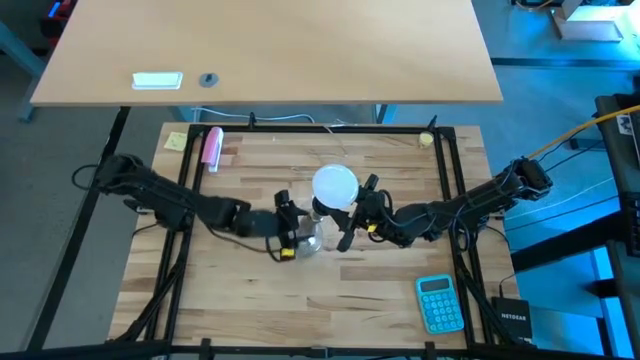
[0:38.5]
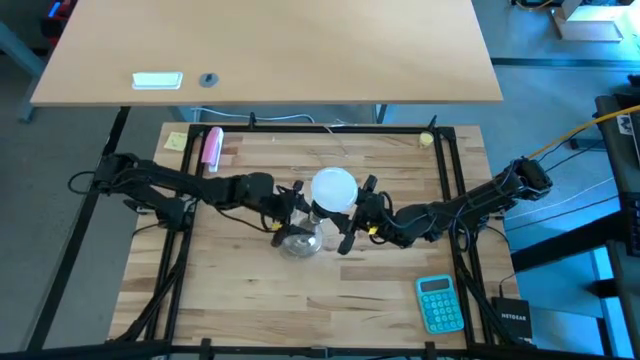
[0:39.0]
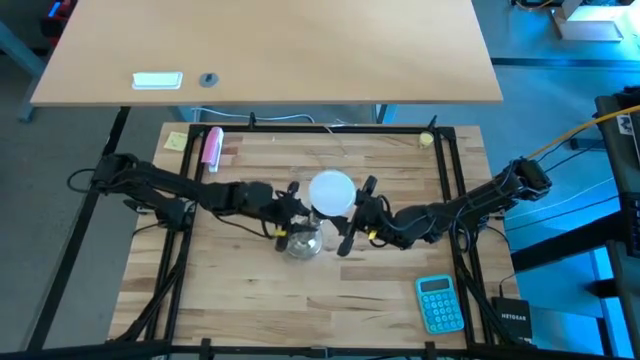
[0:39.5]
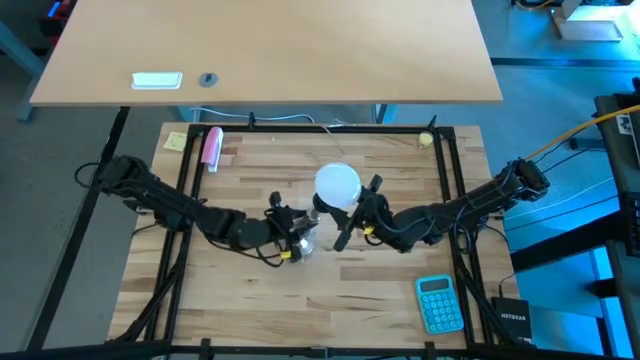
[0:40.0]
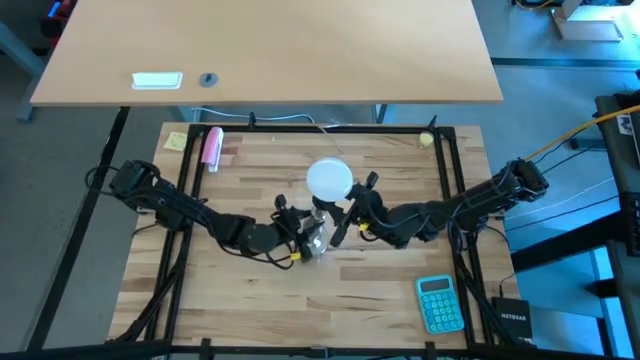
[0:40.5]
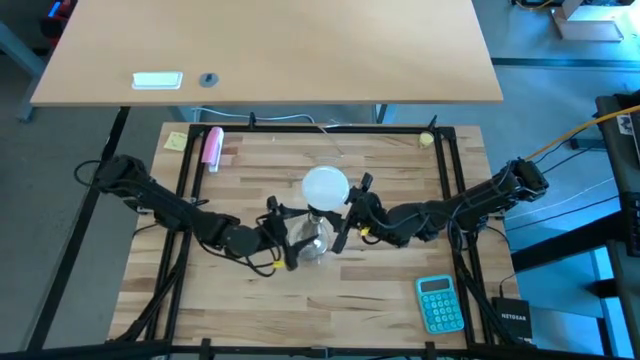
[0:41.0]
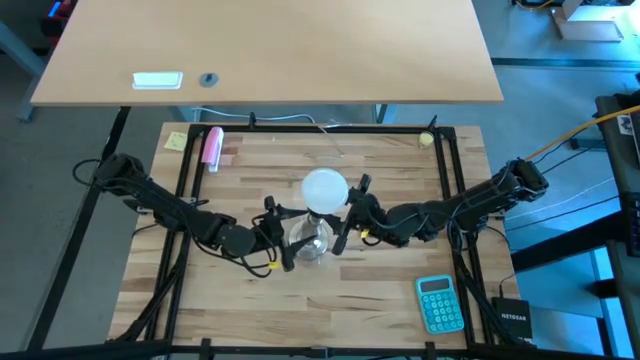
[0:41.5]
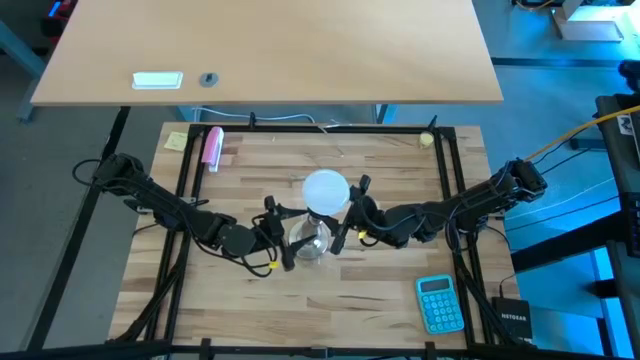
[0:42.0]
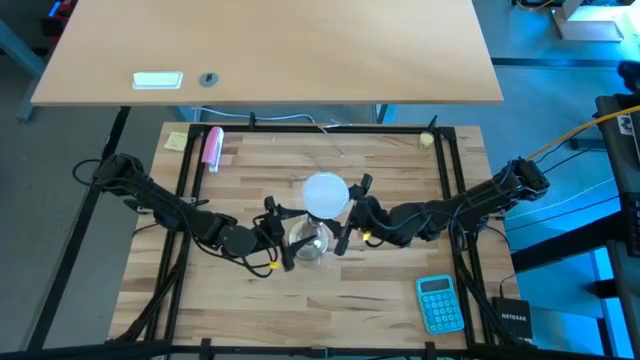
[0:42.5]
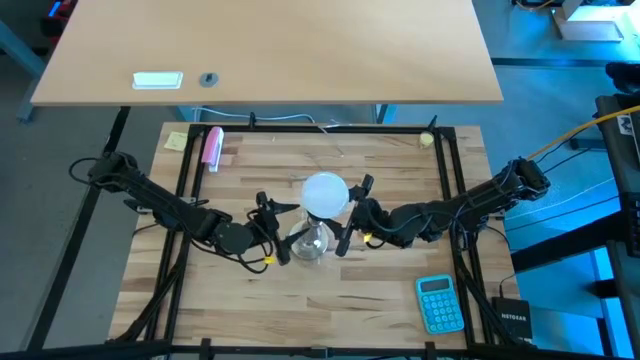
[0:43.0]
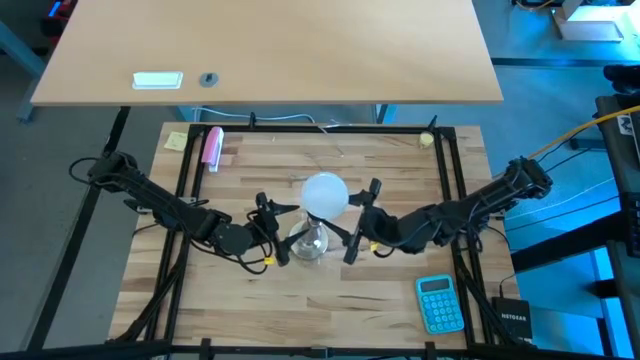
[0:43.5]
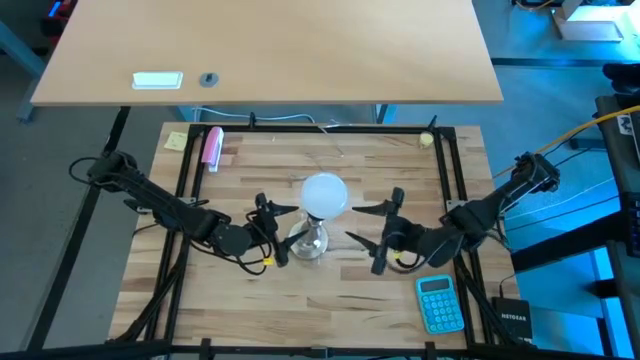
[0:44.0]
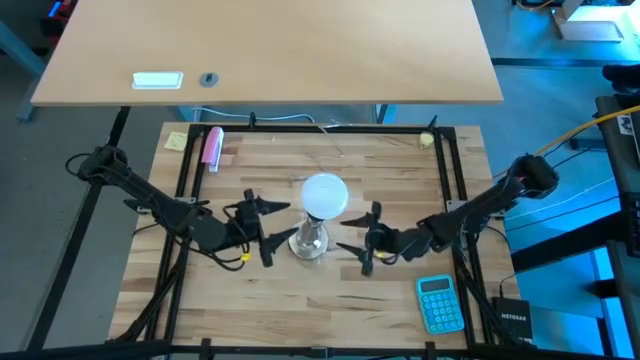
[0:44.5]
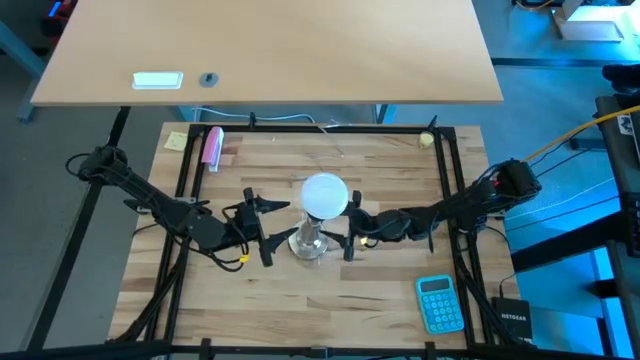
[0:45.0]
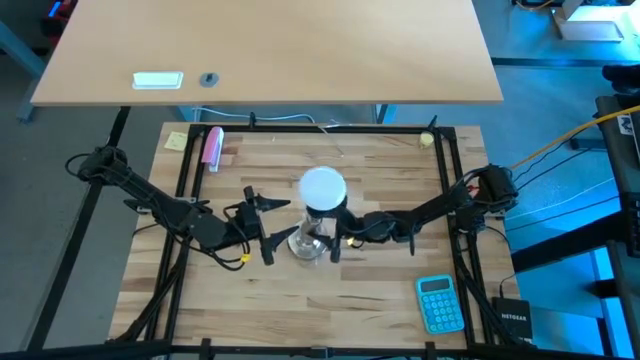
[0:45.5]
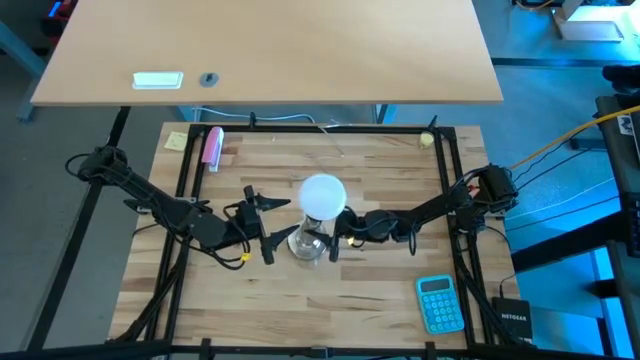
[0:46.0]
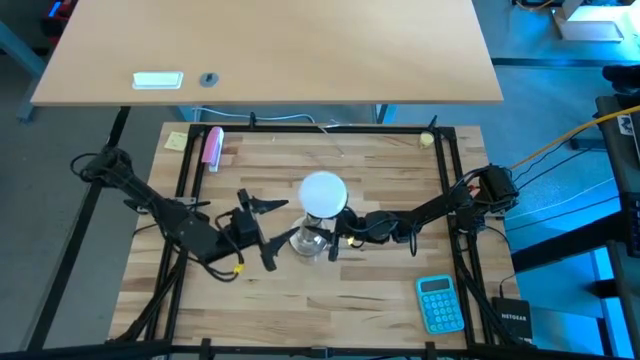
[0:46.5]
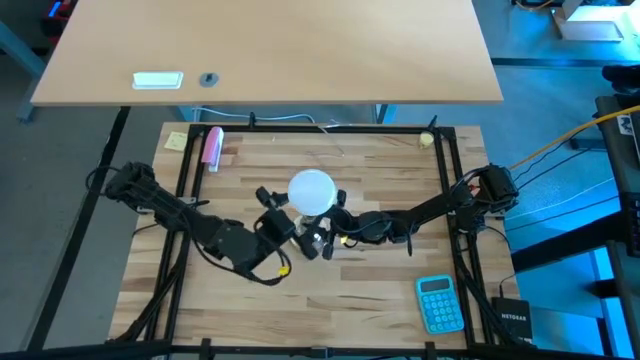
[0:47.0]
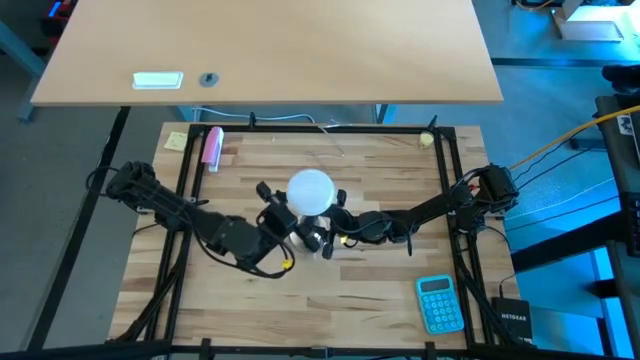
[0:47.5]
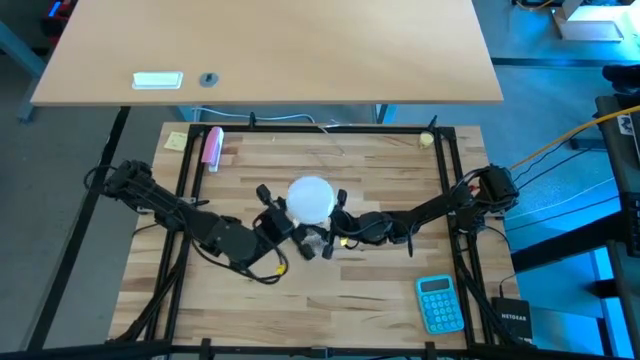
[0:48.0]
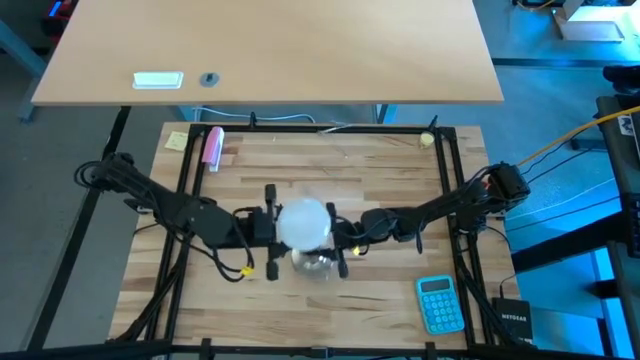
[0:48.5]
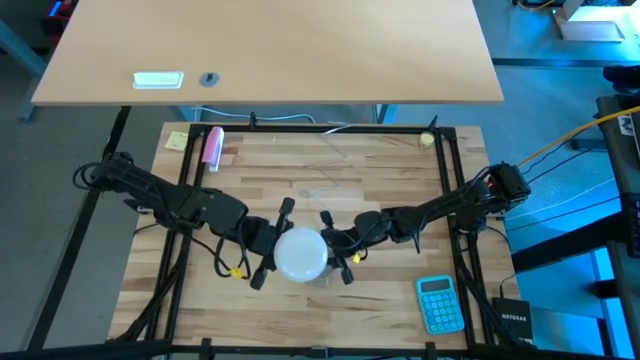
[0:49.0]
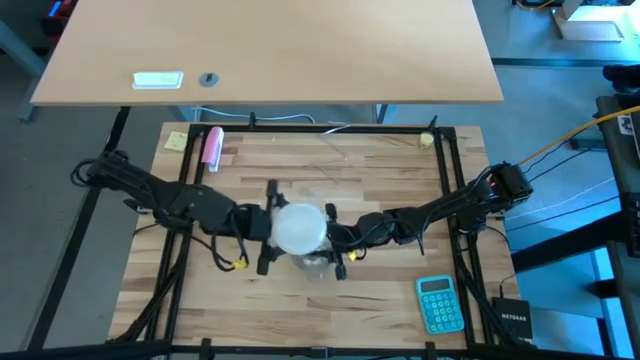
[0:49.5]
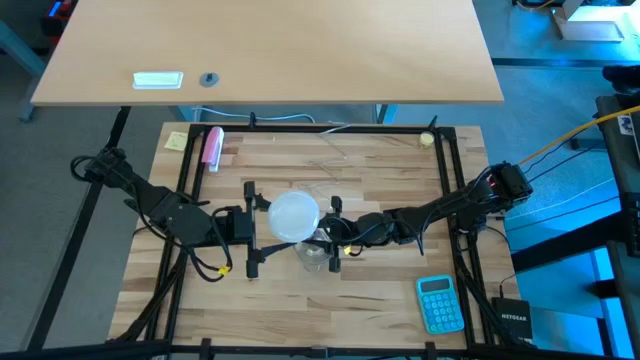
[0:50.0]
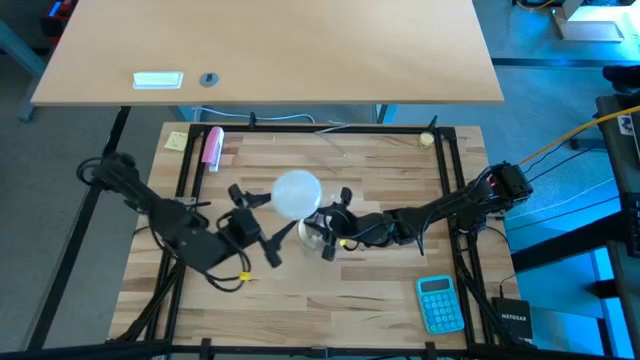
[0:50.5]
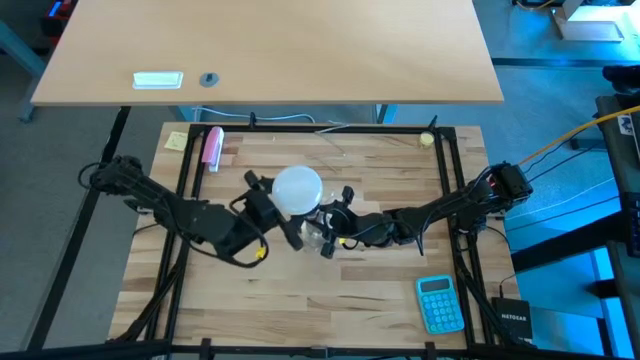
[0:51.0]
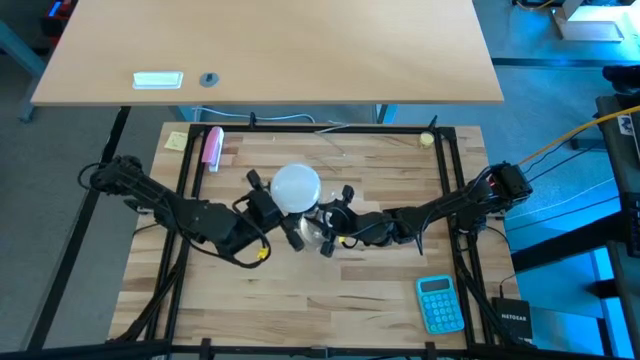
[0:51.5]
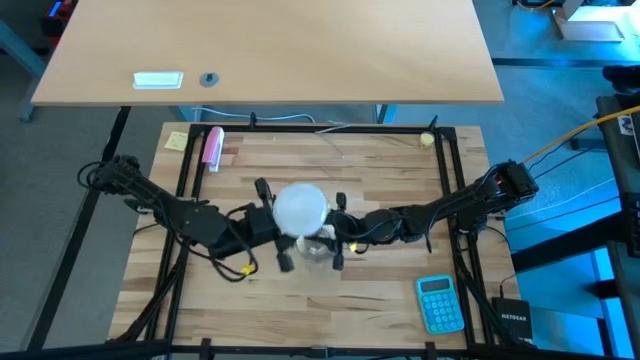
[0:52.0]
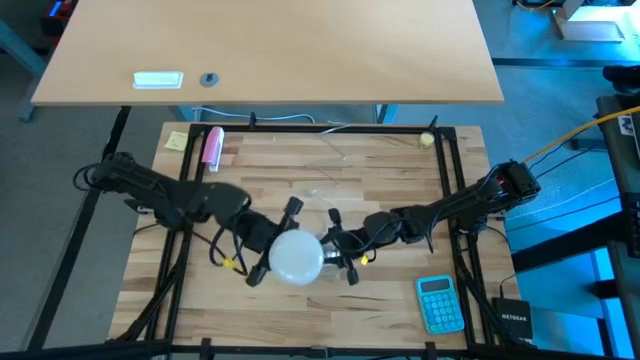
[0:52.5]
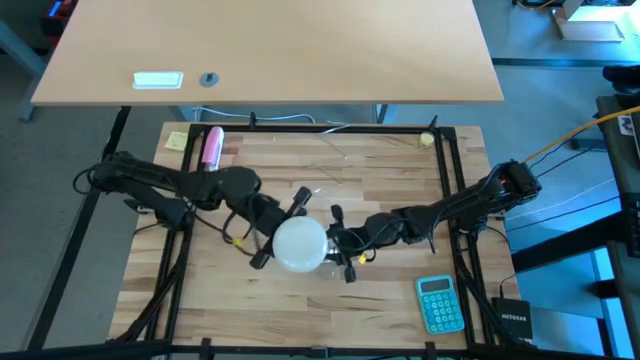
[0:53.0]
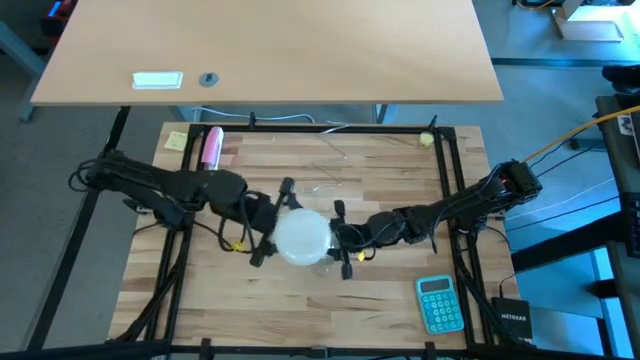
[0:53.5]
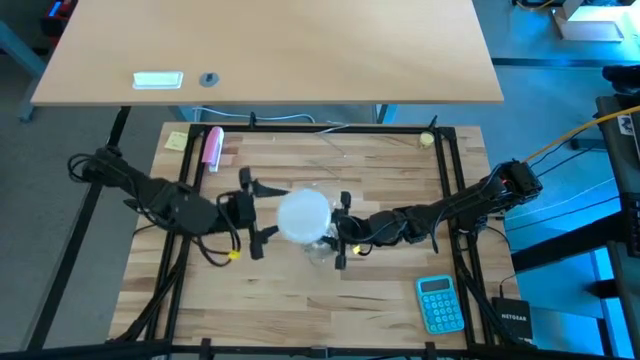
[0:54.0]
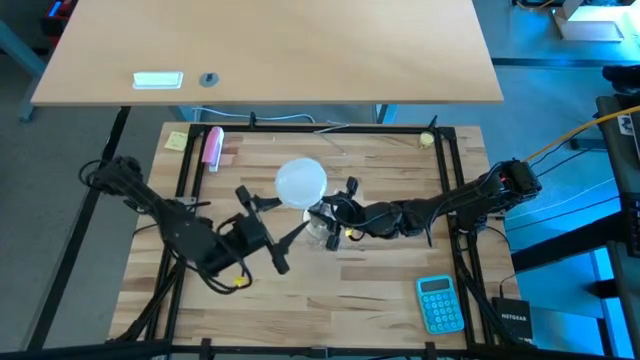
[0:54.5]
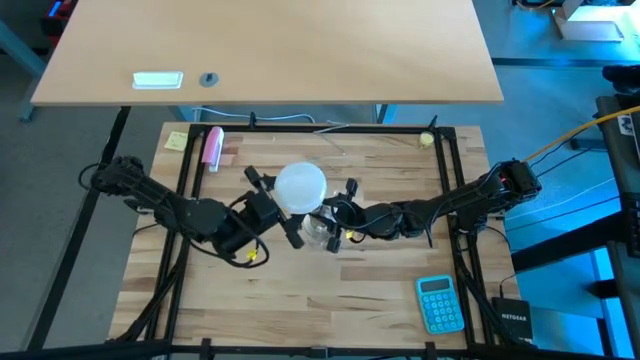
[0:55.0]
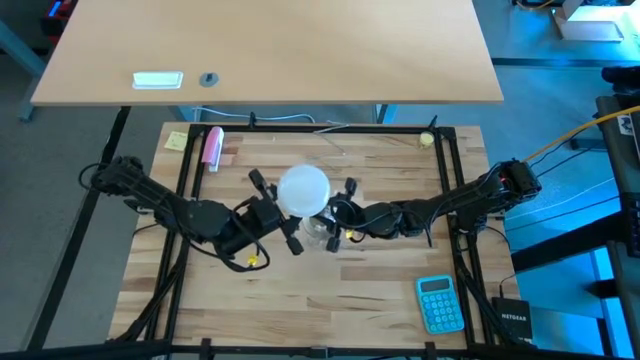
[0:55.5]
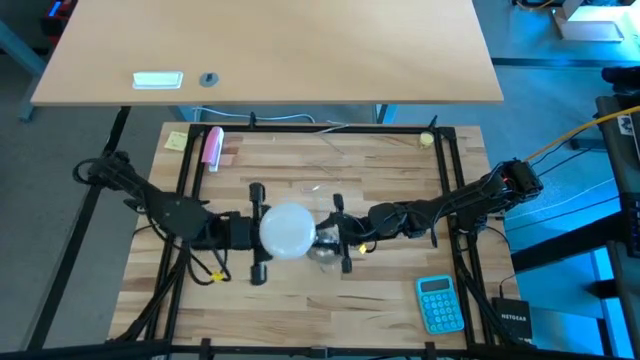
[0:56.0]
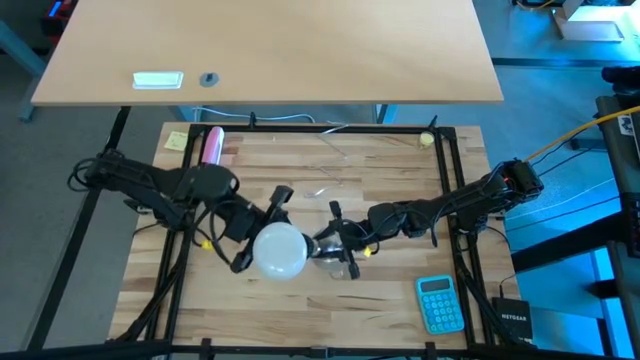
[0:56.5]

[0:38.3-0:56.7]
Task: Screw lightbulb
Insert the light bulb into the lamp

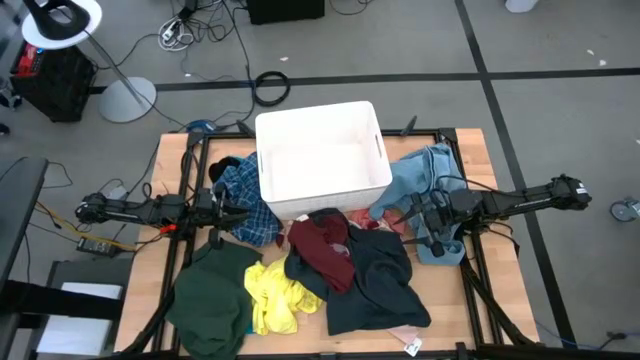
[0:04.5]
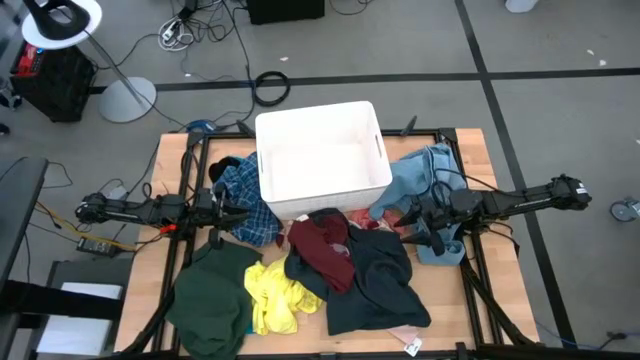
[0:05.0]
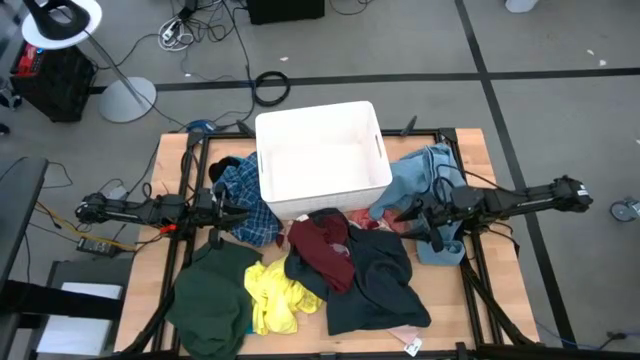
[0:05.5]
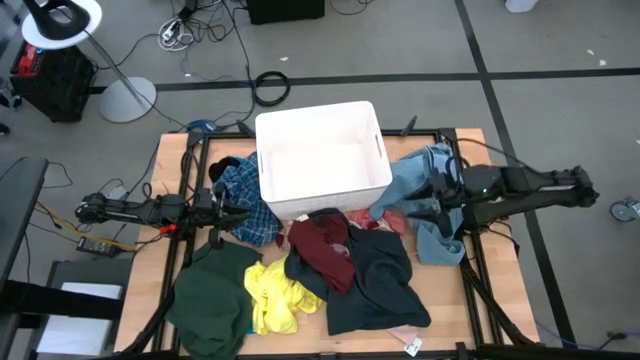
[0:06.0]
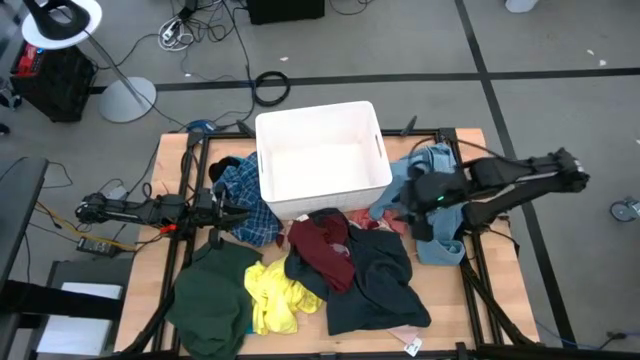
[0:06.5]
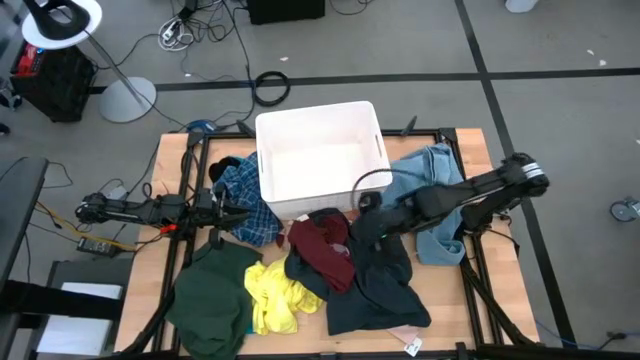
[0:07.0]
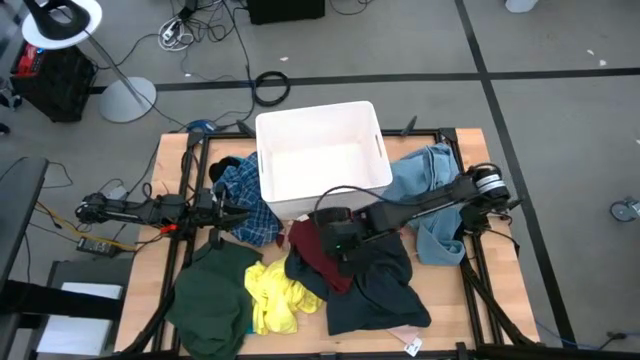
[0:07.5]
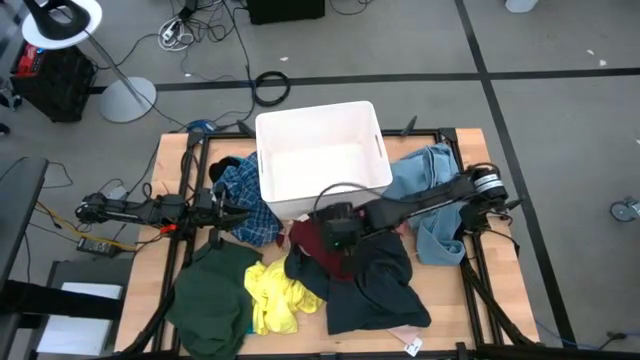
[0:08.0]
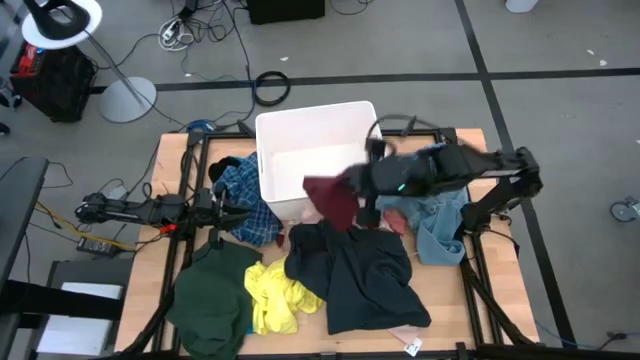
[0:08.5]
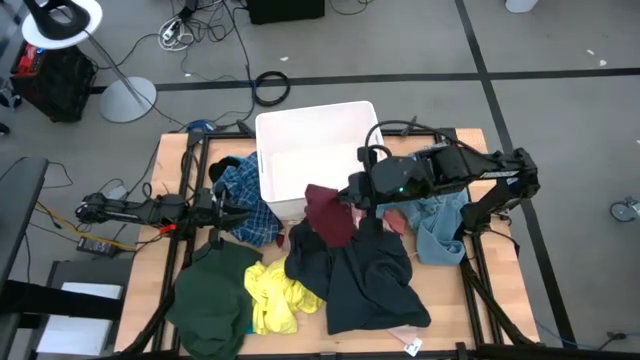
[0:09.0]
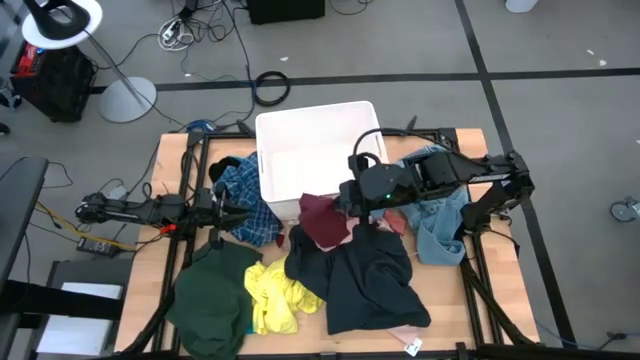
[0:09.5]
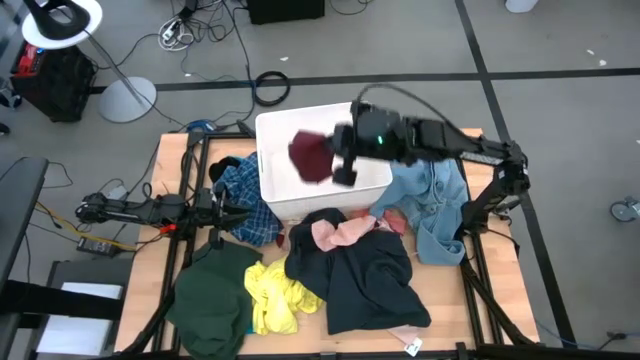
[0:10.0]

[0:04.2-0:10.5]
Task: Sort clothes
Put the maroon shirt into the white bin
